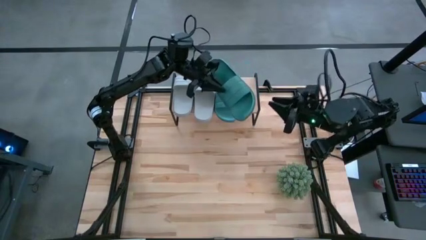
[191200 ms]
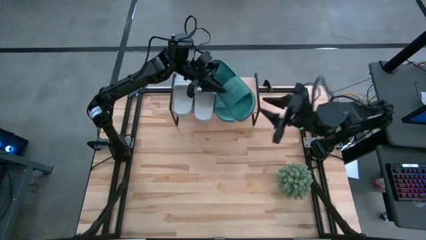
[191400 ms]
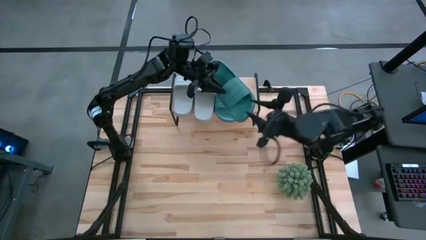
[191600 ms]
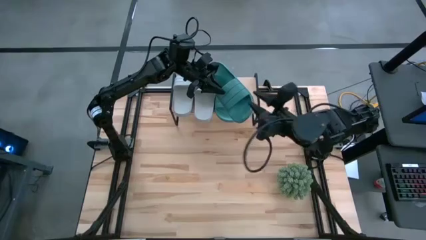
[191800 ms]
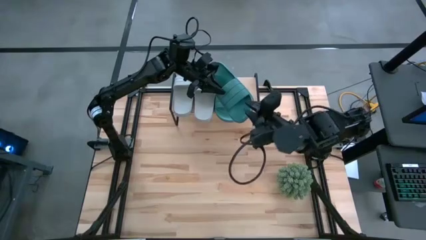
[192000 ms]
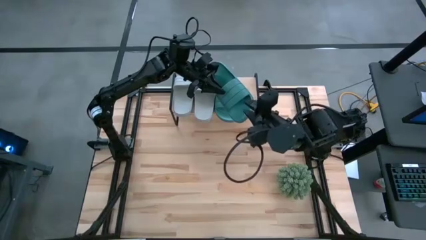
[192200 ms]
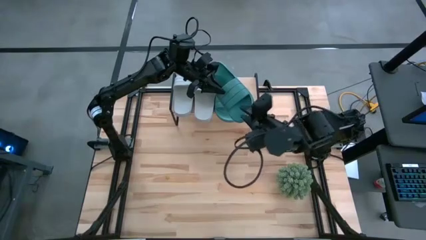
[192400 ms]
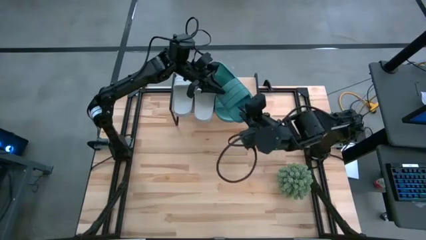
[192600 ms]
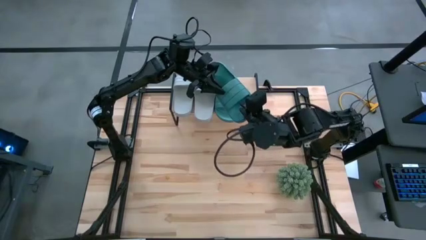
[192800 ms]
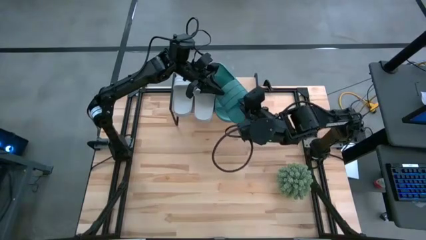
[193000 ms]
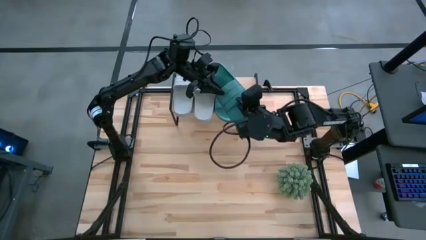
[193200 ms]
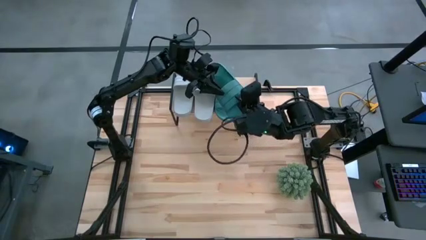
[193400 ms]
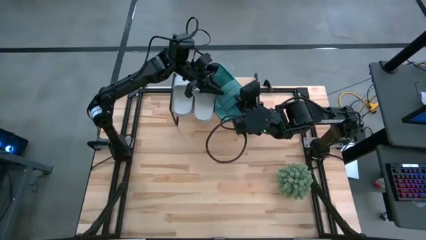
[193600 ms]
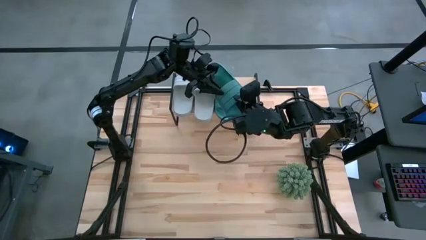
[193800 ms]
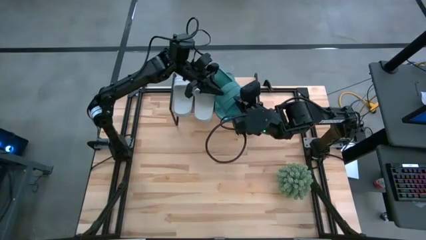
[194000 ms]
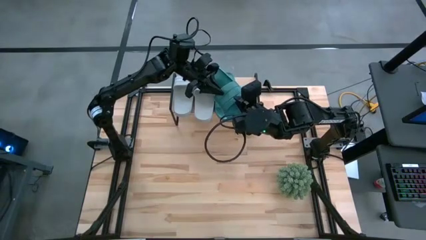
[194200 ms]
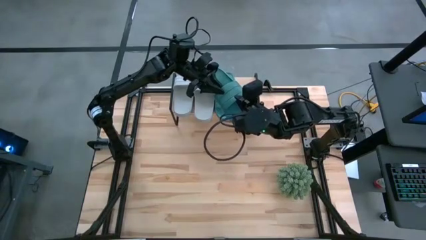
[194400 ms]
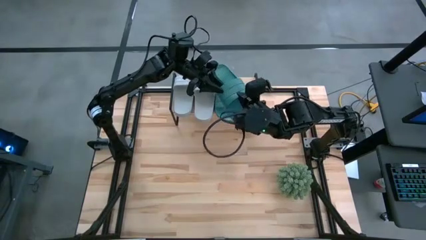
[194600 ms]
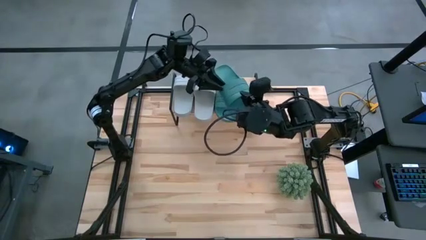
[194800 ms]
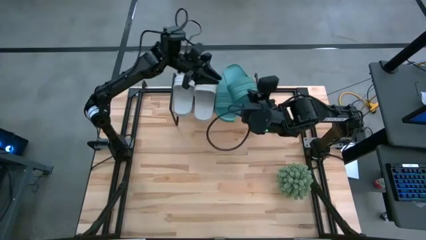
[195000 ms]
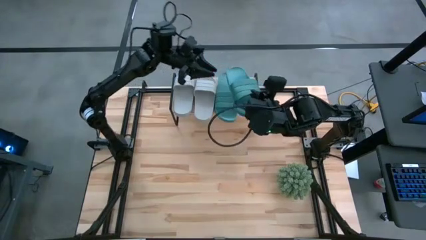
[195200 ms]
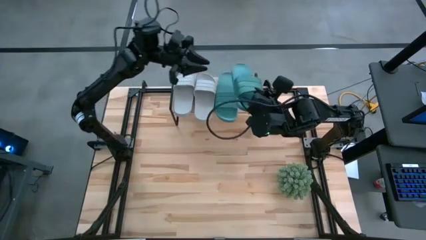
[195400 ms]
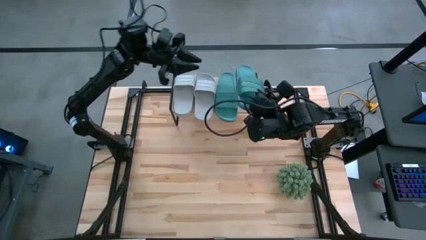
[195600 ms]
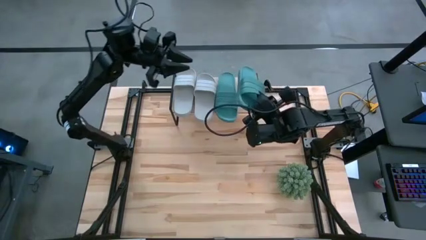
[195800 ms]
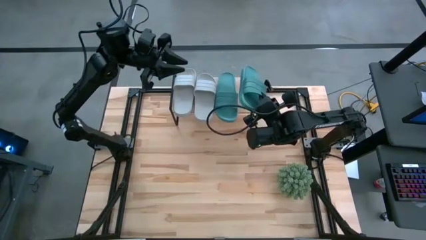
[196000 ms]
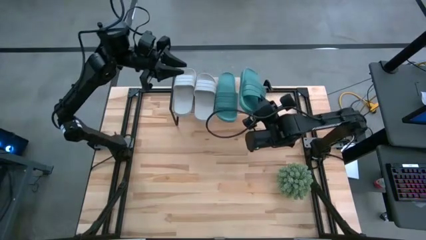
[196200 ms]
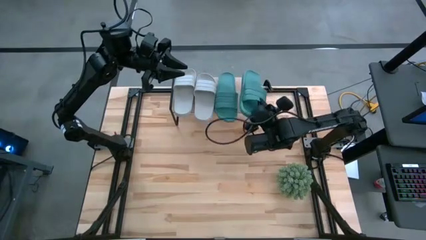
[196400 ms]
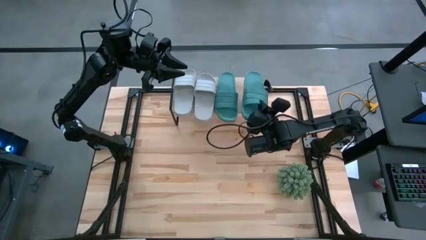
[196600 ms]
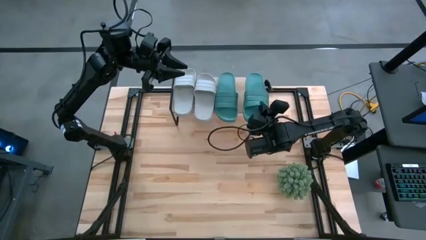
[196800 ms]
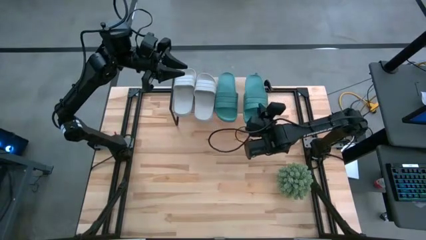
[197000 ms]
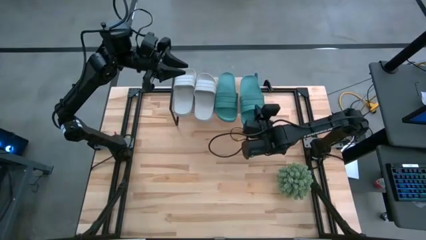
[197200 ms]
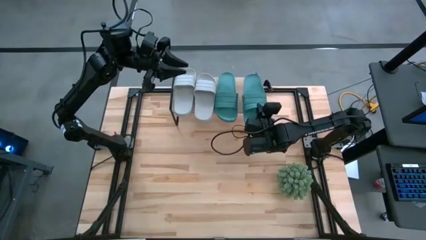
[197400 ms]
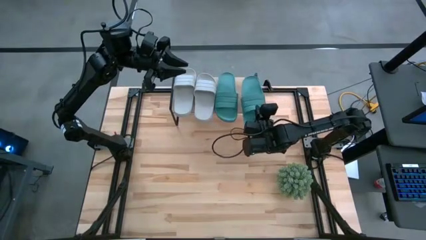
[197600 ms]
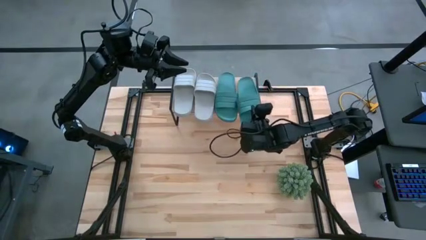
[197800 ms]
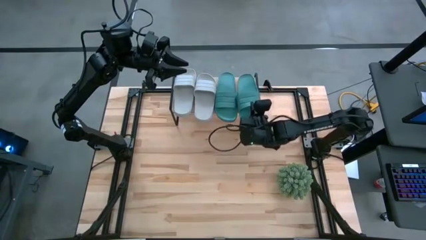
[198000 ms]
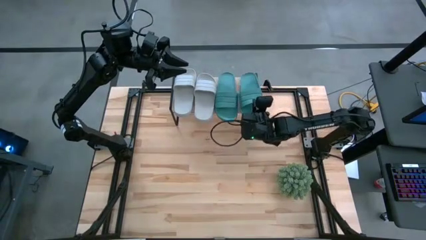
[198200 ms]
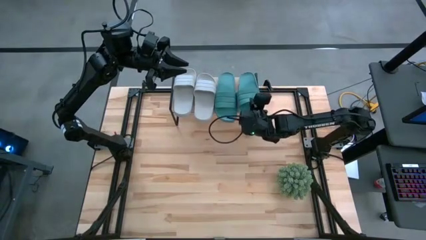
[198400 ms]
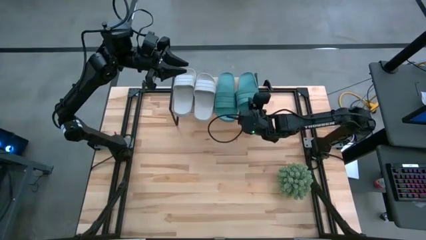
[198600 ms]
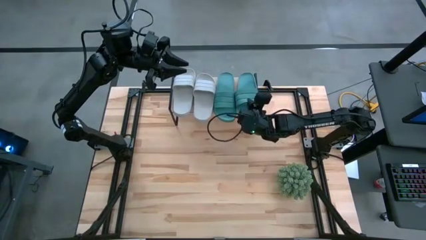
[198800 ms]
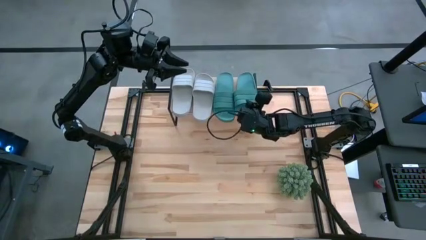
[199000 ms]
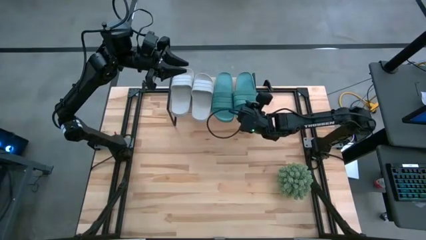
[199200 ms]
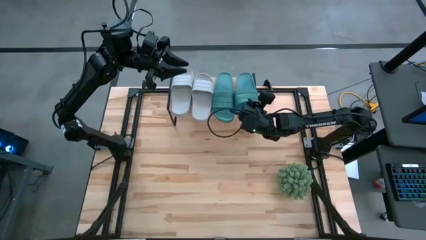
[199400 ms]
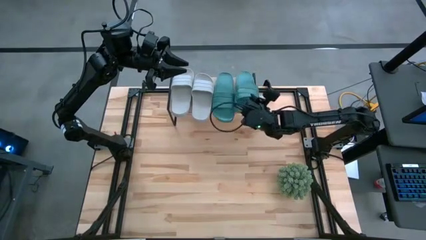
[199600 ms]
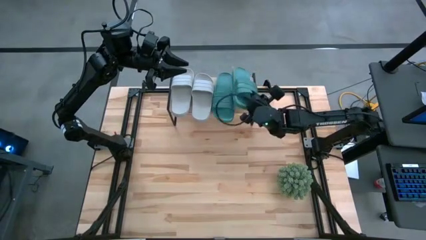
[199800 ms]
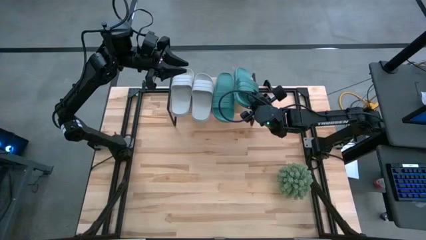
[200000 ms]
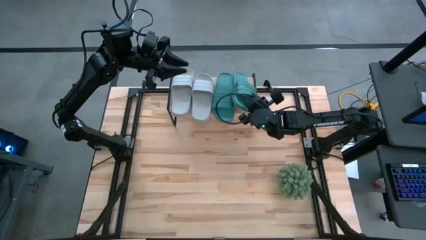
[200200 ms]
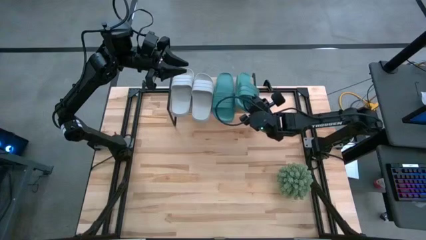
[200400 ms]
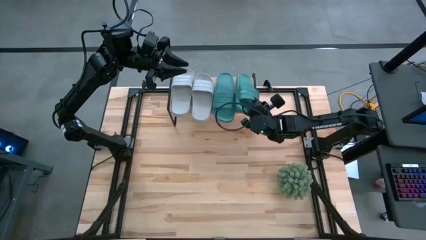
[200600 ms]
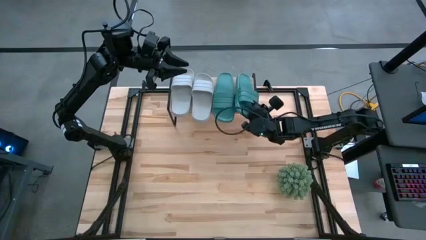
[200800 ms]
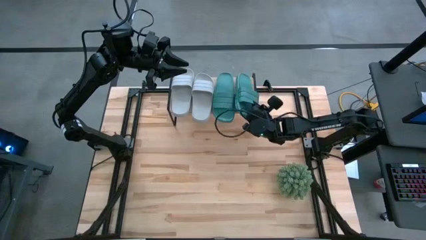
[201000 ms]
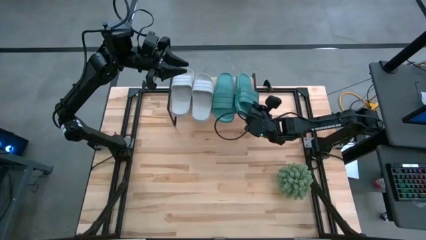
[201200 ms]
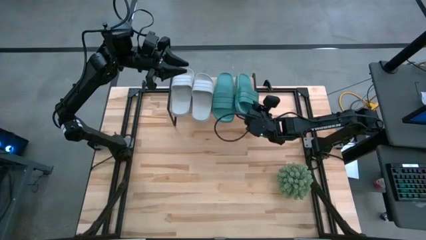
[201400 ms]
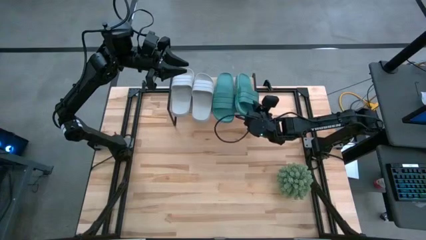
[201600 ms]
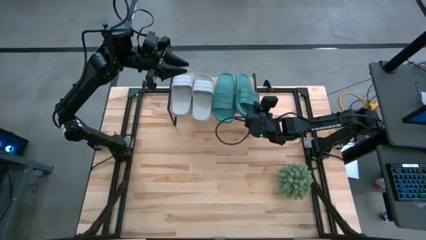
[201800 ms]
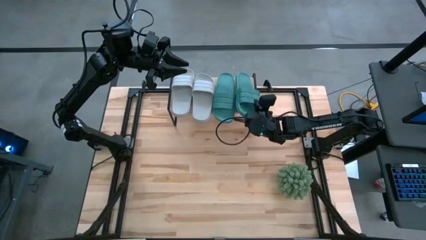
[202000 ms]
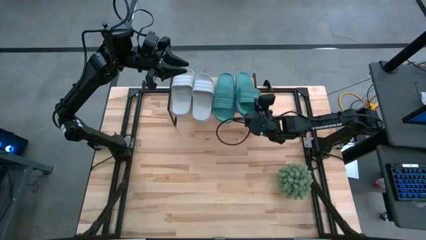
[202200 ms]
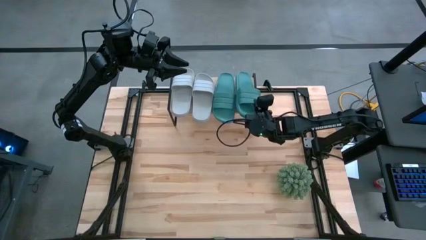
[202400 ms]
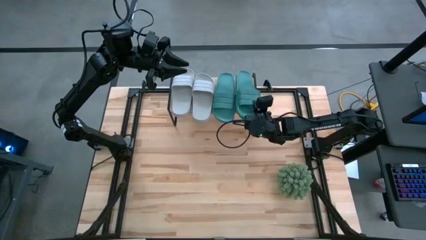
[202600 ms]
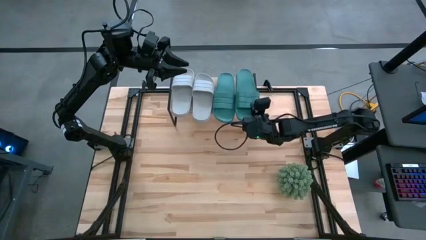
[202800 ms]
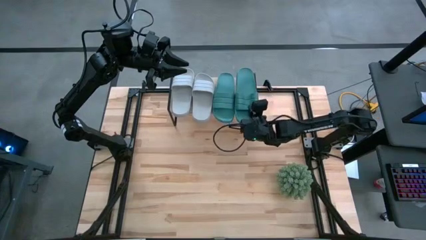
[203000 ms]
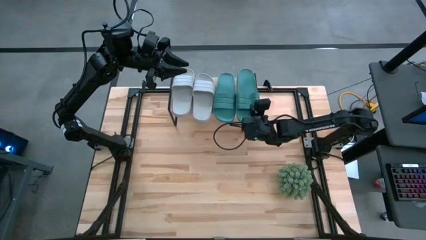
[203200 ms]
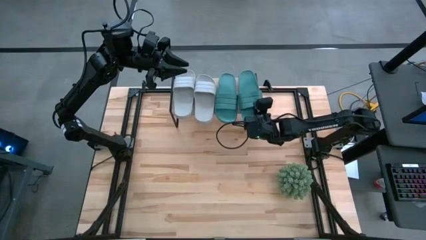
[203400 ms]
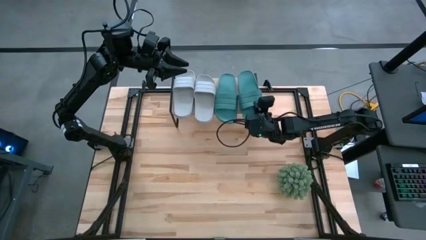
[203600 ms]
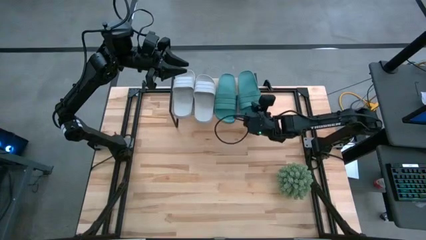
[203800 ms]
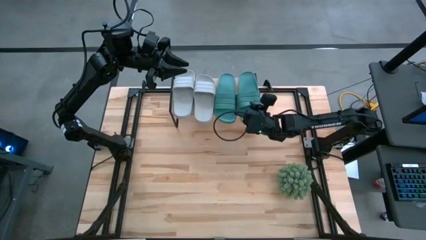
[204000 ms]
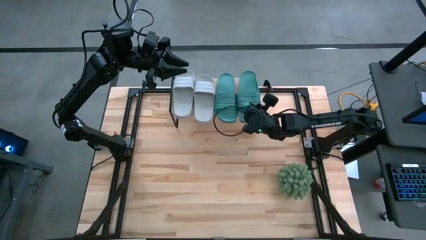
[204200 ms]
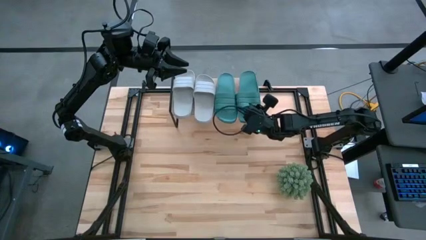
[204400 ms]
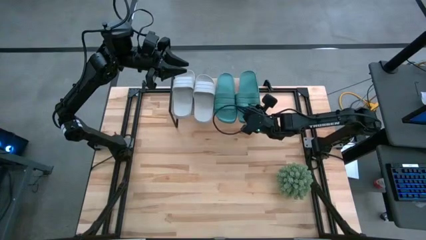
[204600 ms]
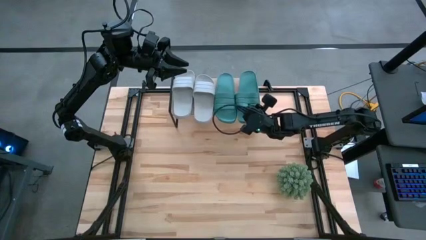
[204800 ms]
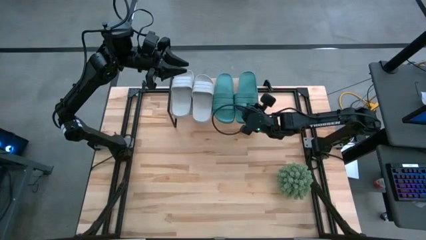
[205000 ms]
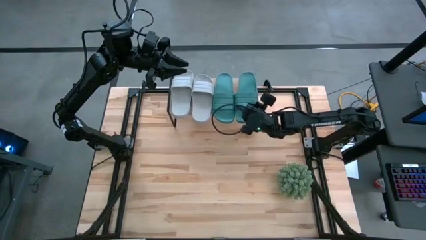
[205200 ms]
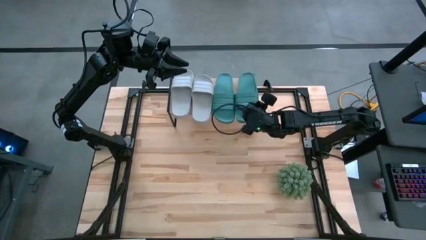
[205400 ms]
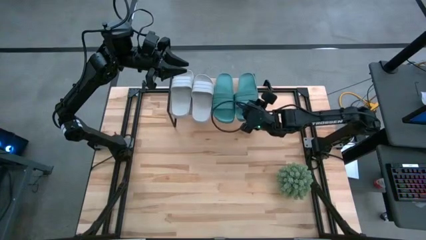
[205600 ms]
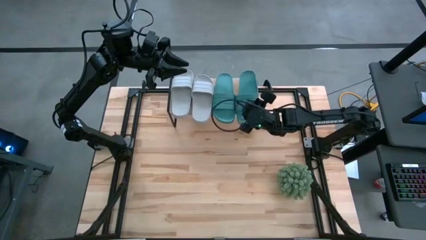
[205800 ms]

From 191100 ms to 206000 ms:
Task: Pick and place slides into the shelf
Put the green slide on the shelf

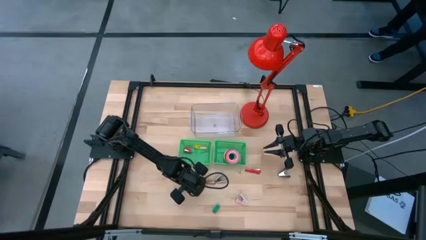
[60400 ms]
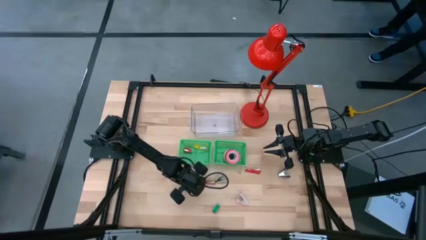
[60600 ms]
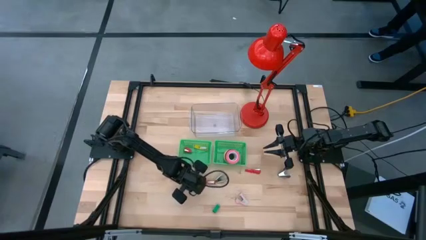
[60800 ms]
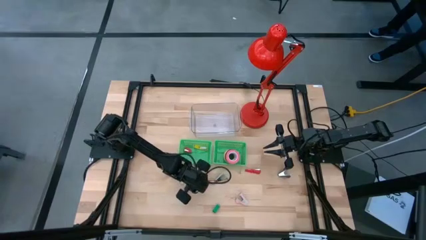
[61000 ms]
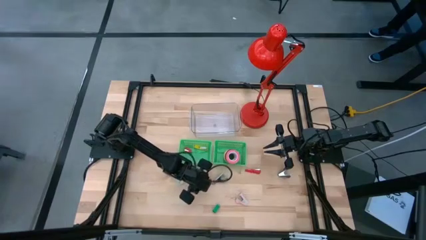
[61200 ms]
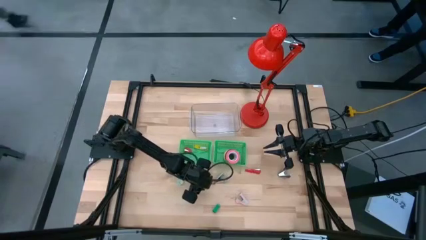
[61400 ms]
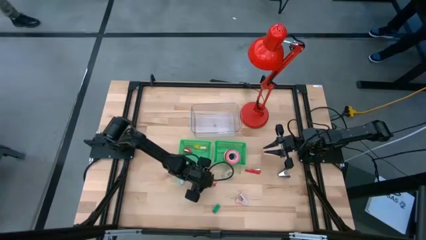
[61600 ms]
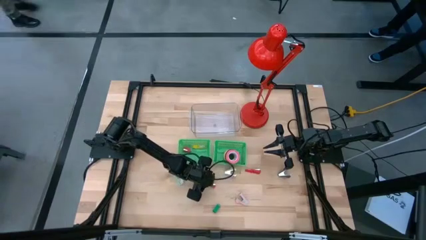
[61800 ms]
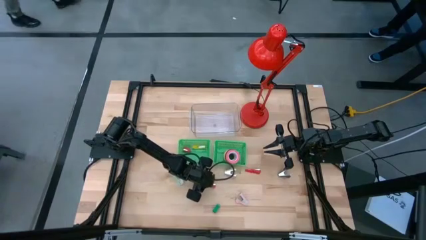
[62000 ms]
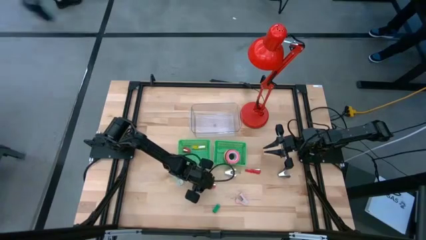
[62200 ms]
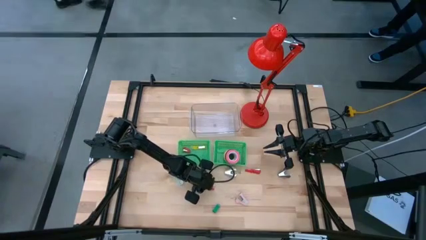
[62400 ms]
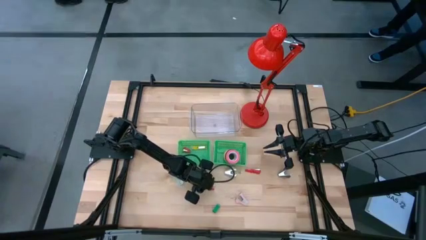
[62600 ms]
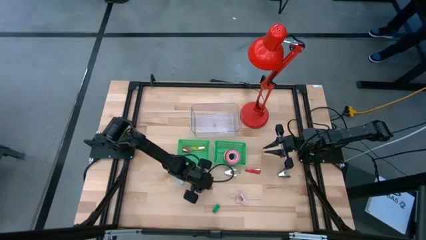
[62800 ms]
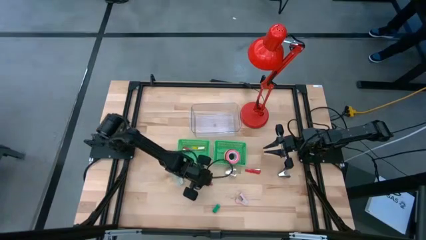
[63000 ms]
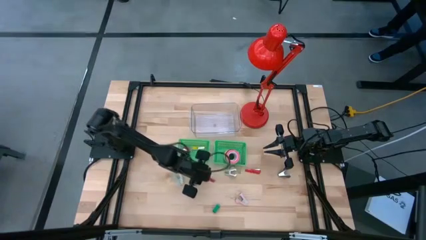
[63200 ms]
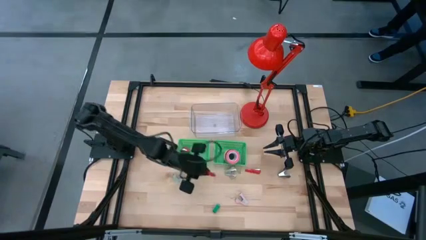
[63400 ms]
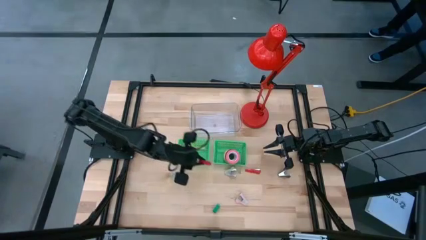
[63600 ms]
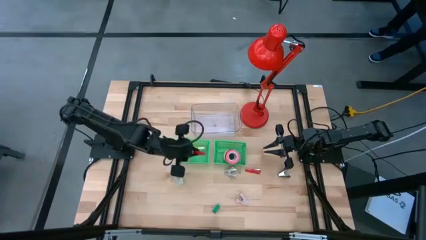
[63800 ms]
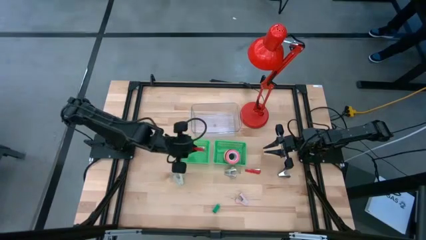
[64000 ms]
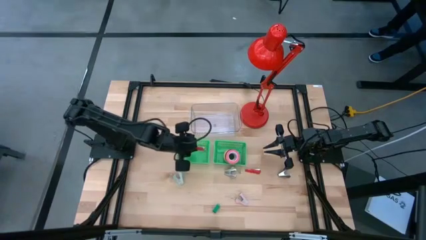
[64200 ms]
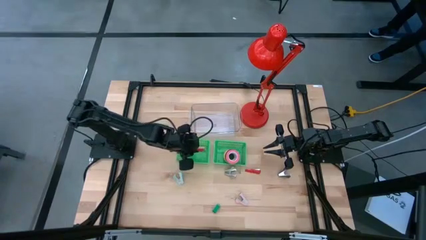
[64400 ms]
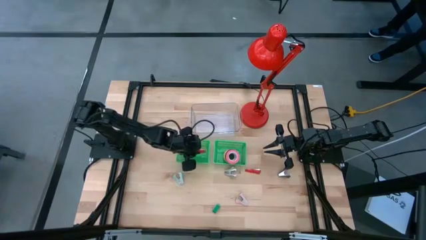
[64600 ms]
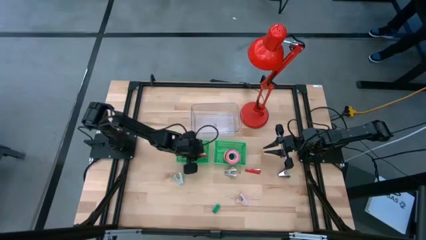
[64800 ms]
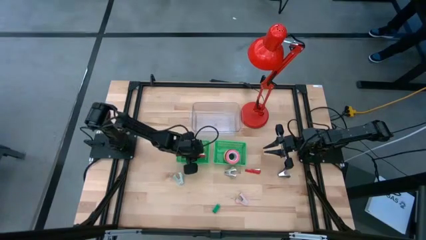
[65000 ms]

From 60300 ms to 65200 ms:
Task: Pick and place Stapler, Stapler remover, tape
Put the bottom red stapler into the left green bin
